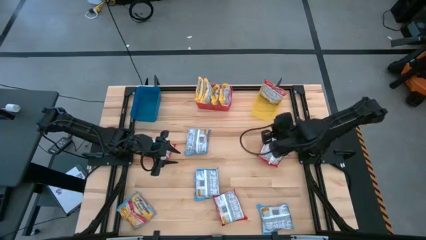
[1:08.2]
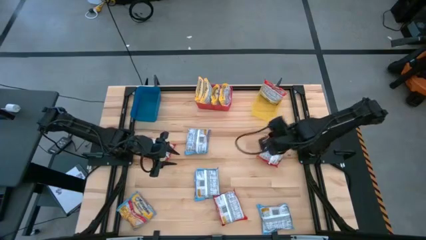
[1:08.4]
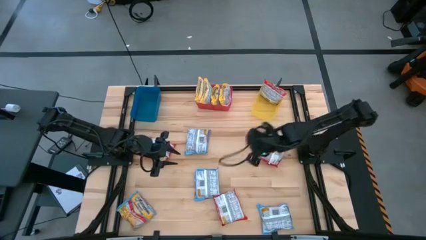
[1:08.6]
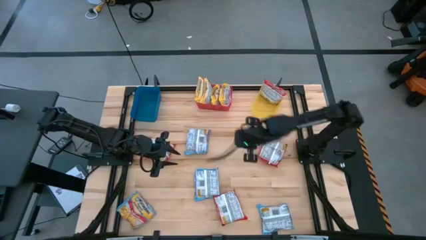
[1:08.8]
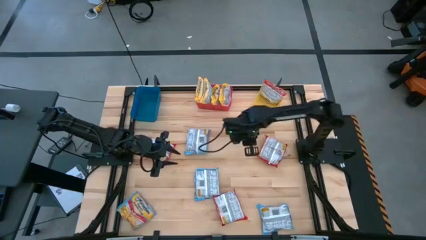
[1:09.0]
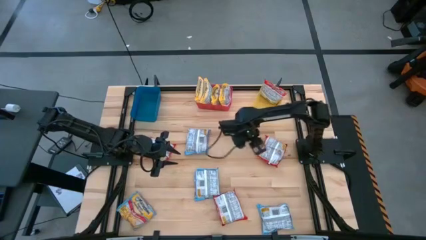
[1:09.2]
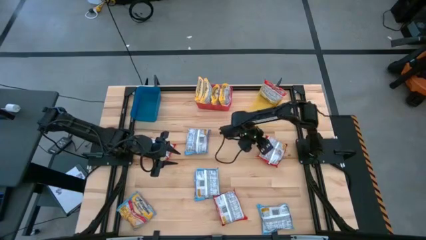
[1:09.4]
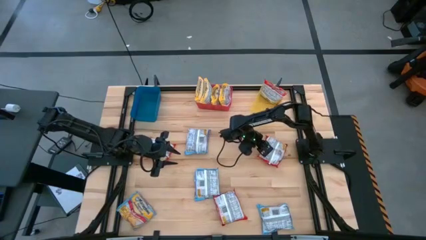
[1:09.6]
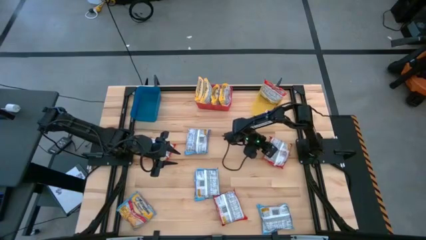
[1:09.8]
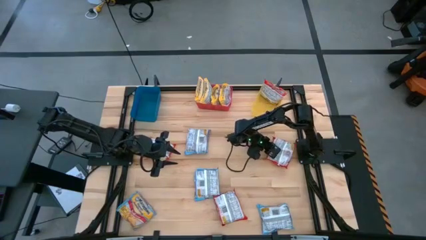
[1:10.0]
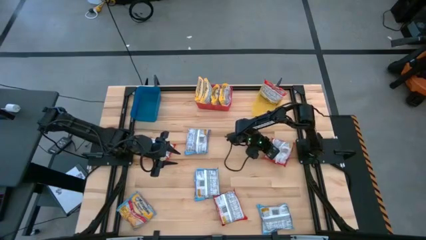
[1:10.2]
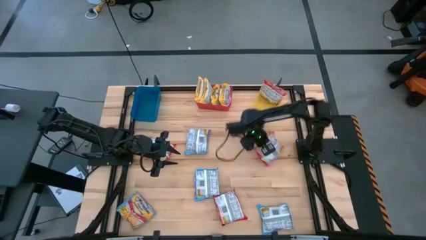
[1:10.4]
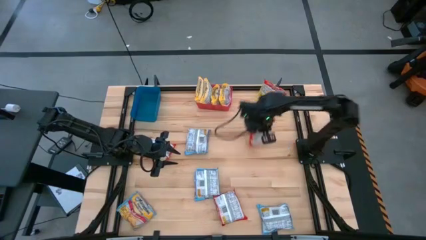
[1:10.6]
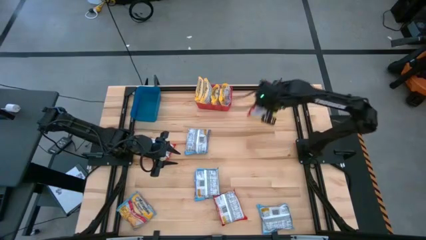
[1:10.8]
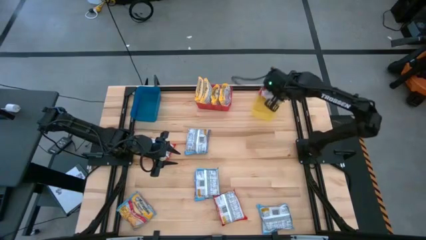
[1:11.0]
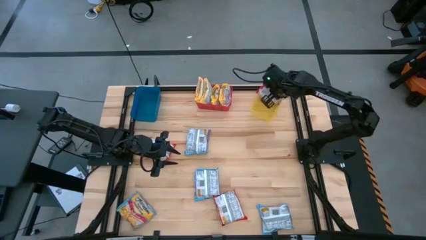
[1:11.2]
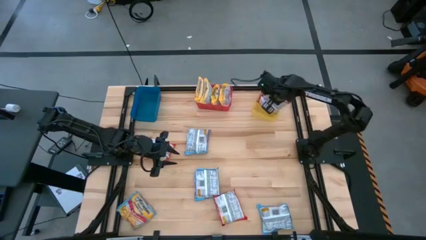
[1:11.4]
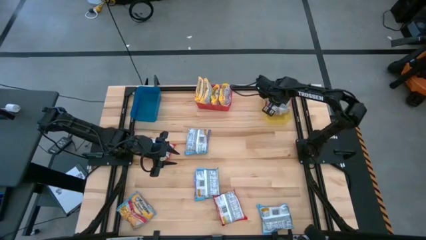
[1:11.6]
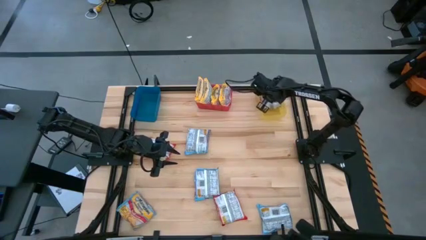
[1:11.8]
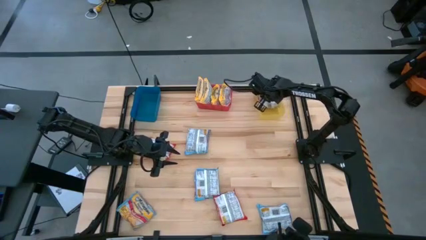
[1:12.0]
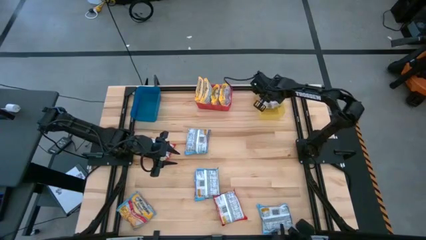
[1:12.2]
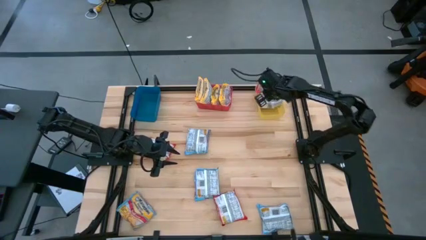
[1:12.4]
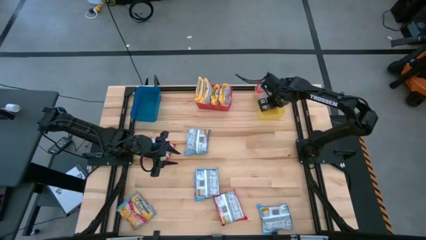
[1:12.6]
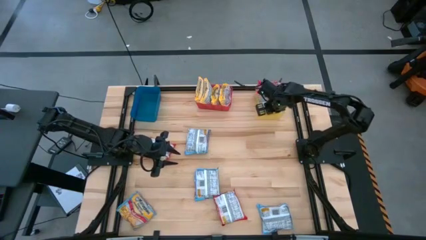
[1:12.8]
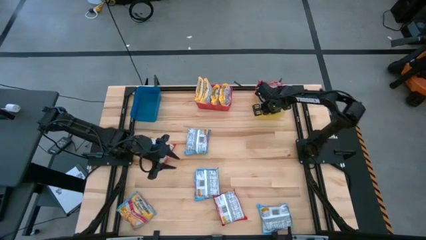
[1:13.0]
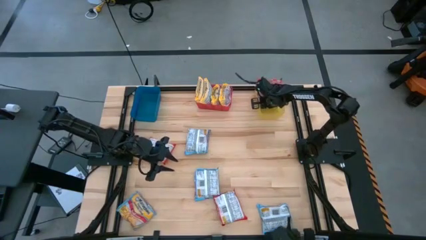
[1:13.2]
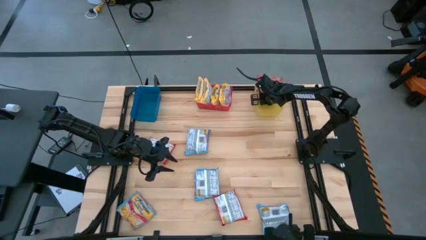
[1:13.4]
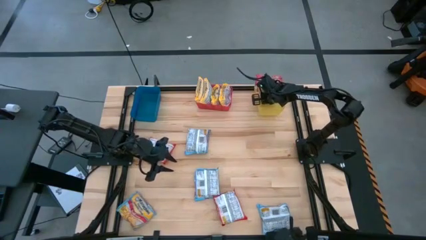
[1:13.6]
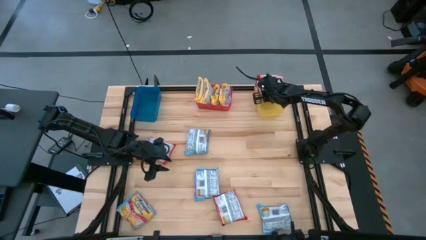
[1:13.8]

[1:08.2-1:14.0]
Task: Sort Maruchan noodles
Put the top right red noodle pack into the yellow bin

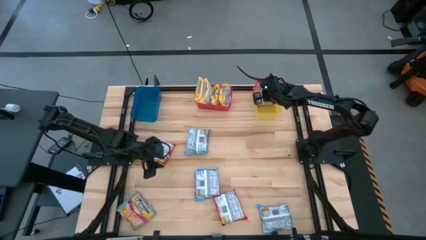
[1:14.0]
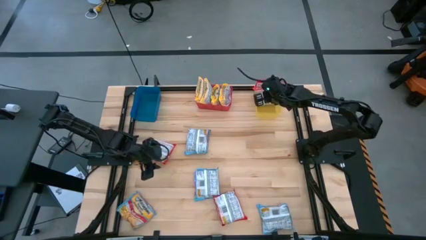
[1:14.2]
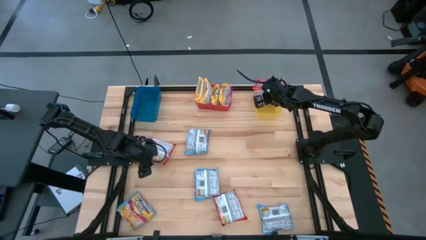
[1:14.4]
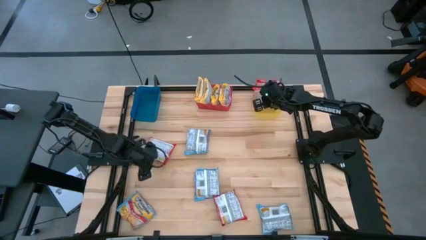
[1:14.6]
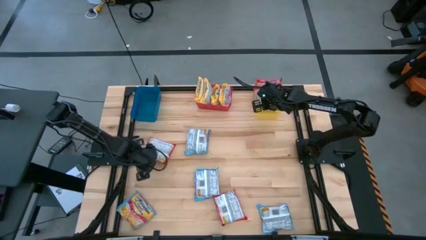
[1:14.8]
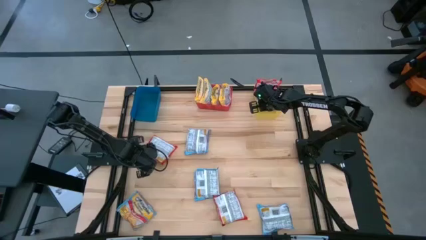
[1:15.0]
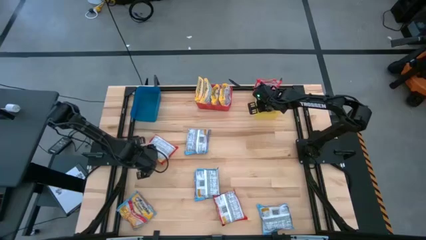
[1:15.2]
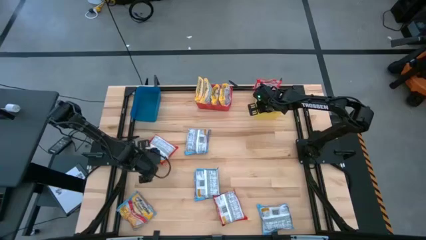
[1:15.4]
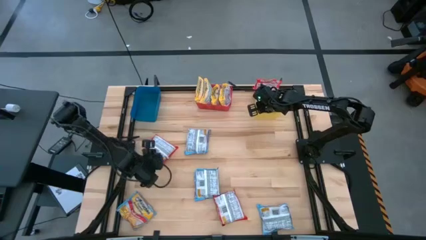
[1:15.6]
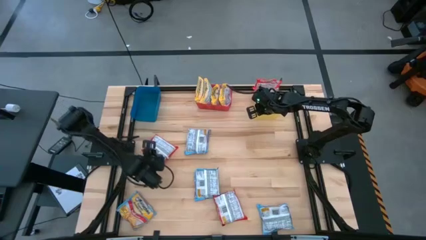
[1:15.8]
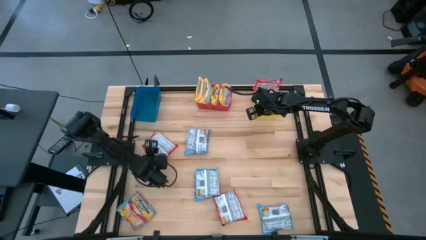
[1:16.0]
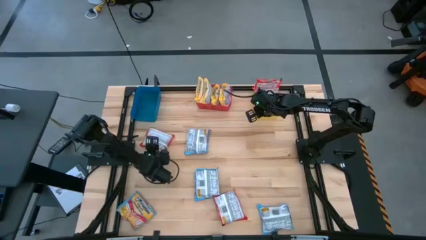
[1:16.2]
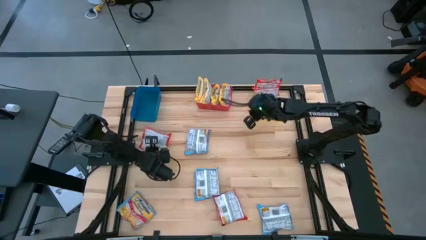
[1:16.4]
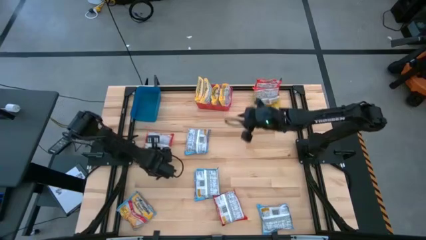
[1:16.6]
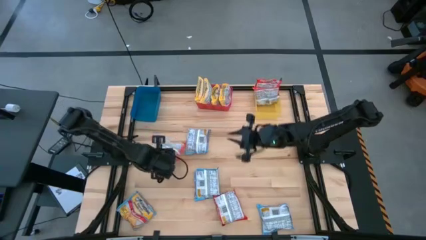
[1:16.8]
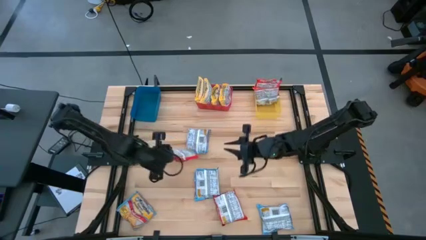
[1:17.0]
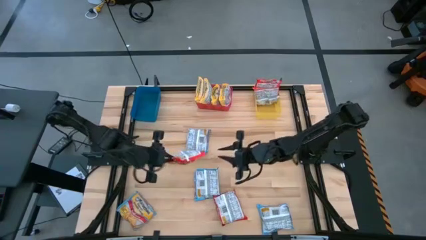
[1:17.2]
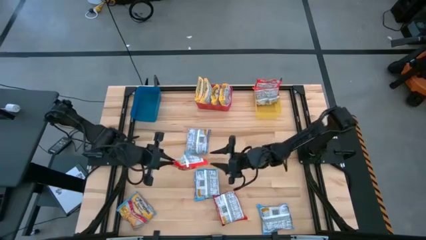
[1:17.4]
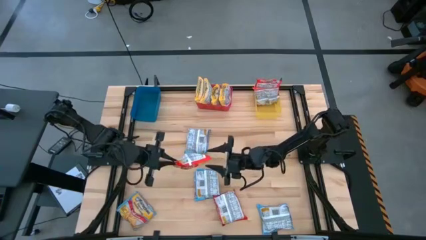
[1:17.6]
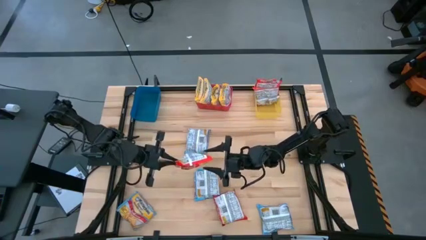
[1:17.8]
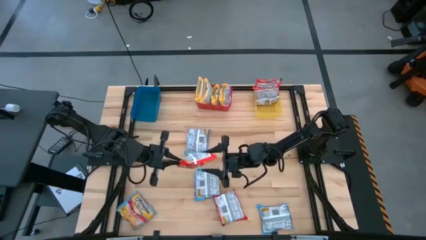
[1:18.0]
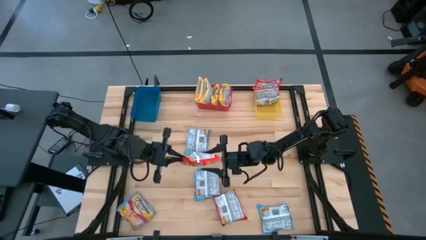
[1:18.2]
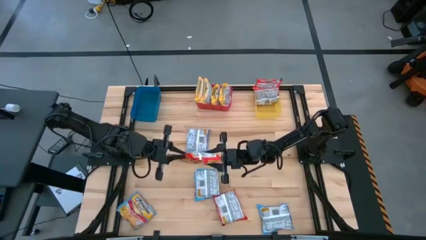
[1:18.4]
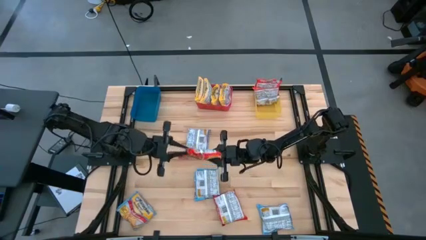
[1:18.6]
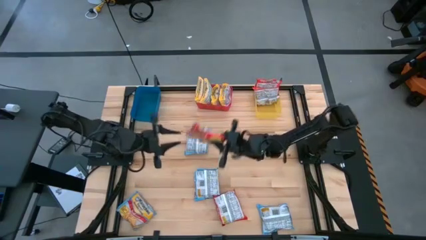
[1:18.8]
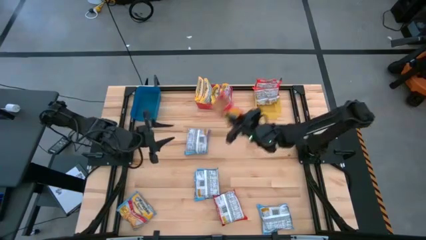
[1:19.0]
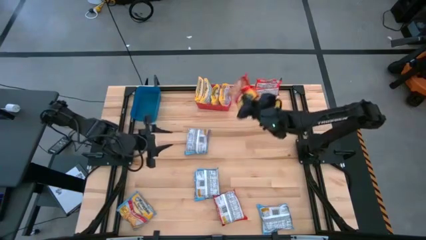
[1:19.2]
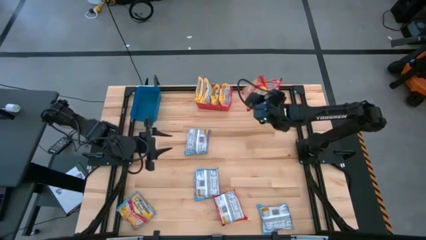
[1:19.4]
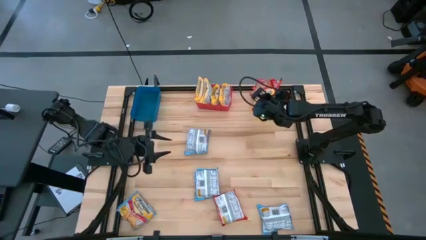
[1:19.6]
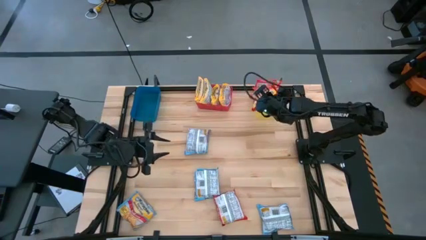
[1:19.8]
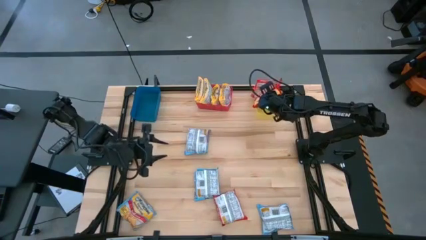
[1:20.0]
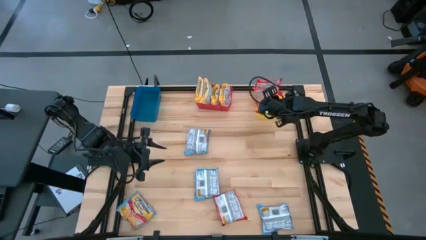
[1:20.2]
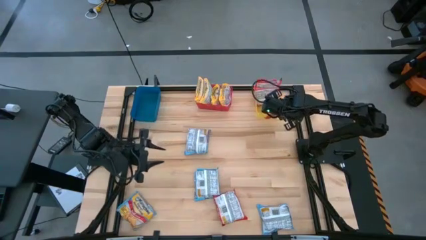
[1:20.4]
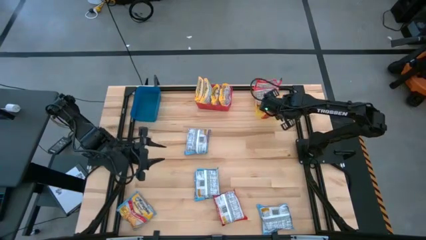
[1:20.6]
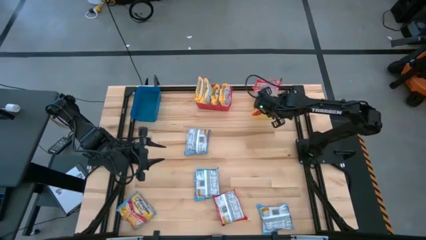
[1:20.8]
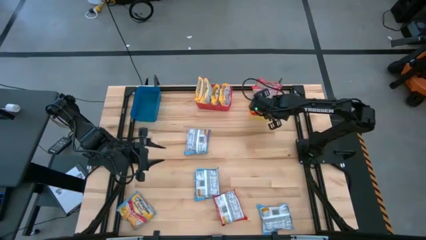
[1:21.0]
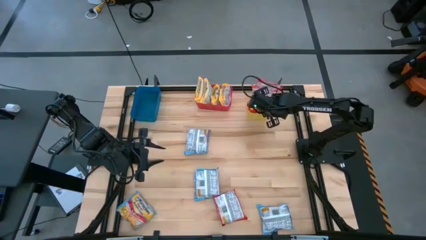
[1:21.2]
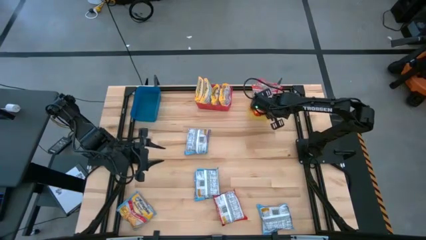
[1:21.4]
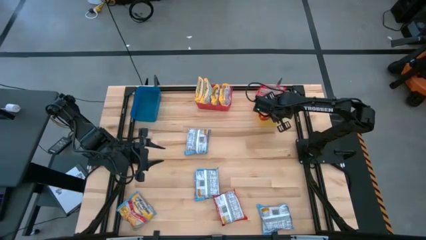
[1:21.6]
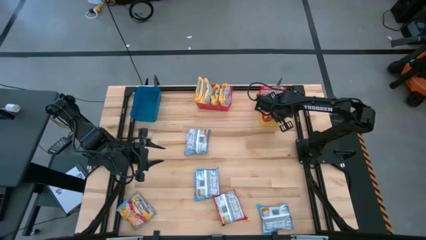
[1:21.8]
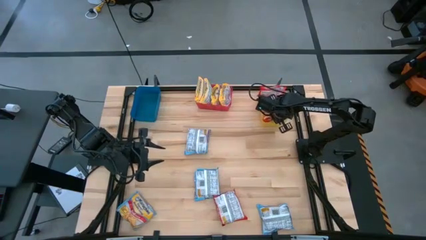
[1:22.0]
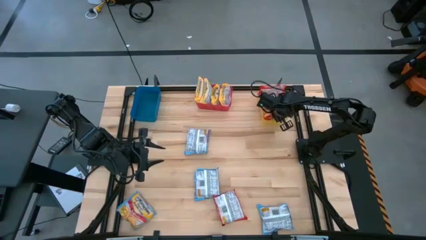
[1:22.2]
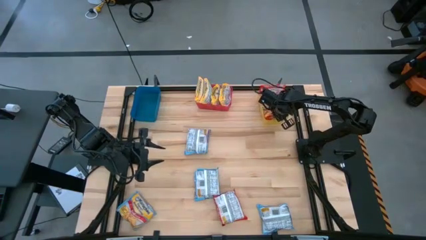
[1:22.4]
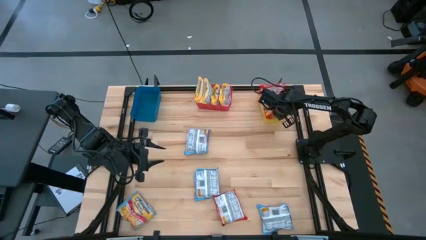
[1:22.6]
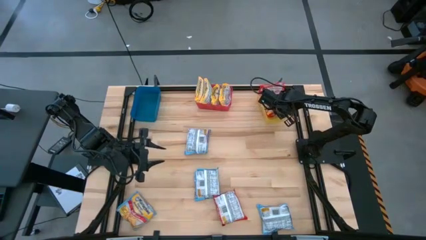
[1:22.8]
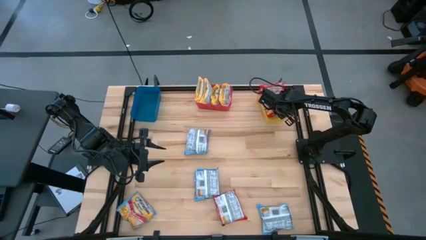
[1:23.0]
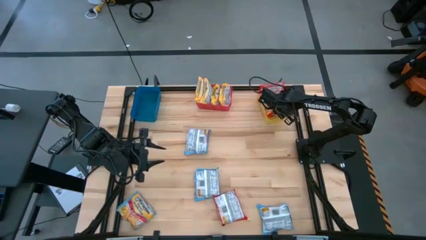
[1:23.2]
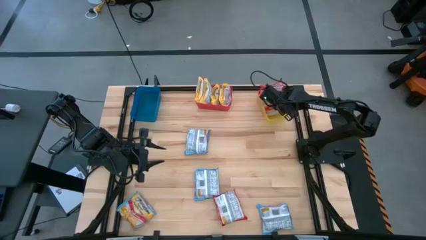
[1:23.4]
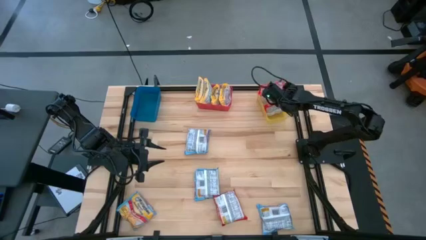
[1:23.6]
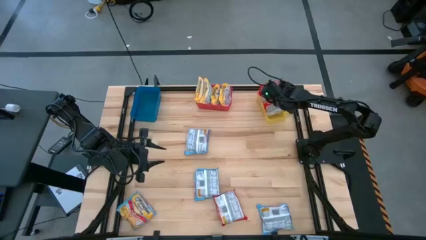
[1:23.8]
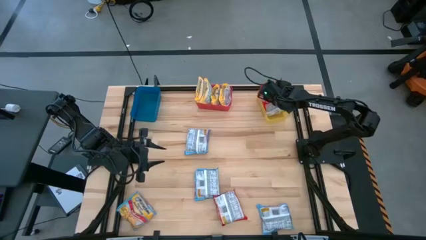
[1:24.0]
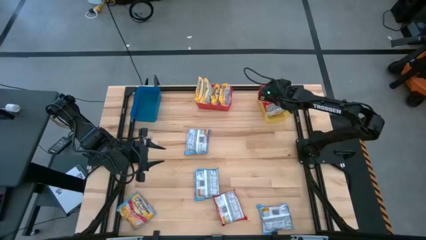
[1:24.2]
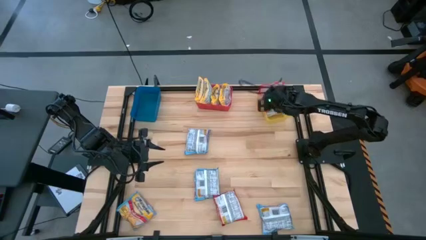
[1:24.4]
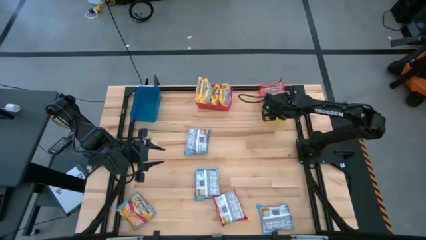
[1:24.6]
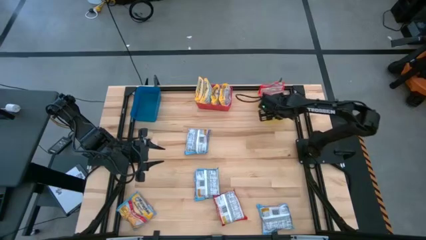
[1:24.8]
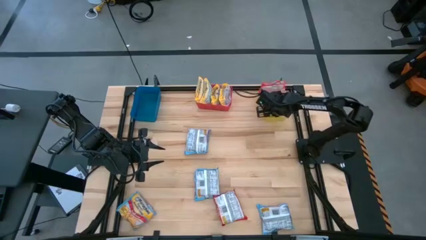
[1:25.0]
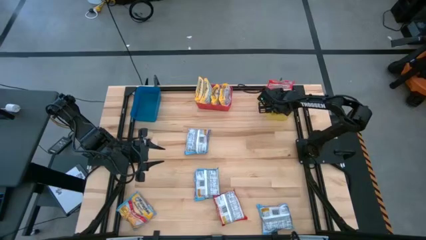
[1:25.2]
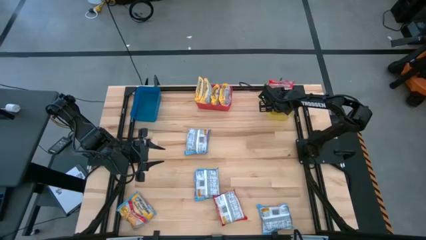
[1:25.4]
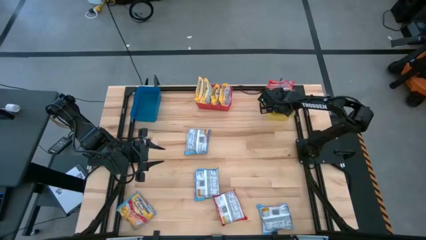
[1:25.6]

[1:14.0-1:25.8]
Put the top red noodle pack into the yellow bin
